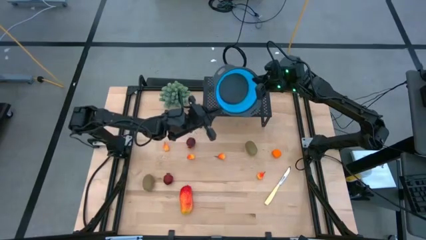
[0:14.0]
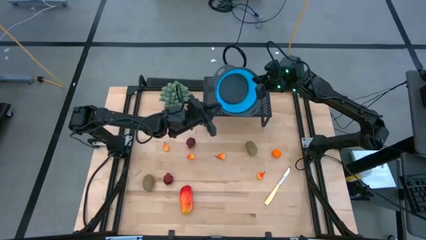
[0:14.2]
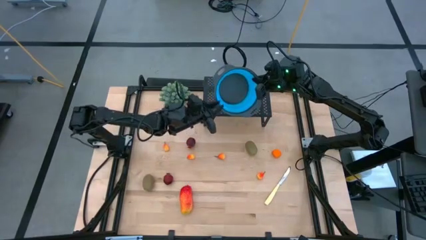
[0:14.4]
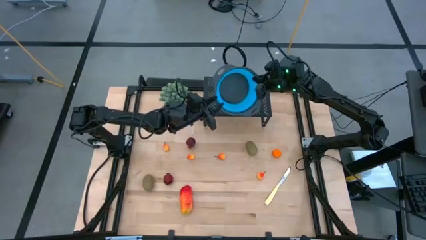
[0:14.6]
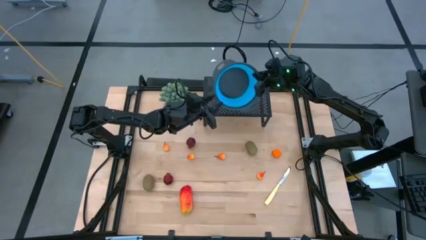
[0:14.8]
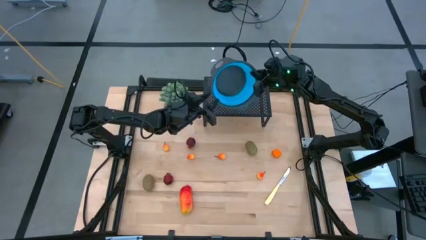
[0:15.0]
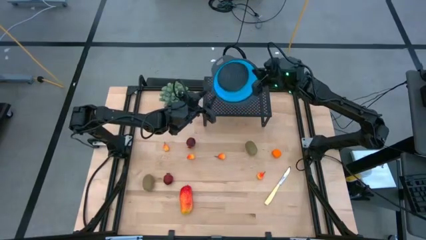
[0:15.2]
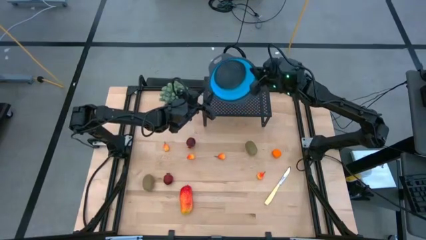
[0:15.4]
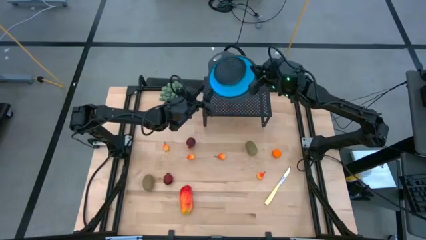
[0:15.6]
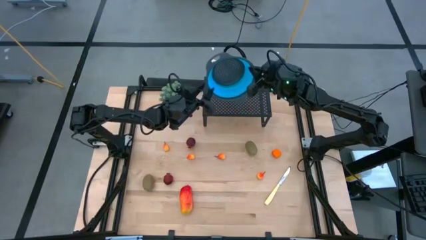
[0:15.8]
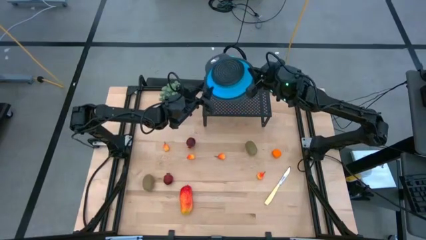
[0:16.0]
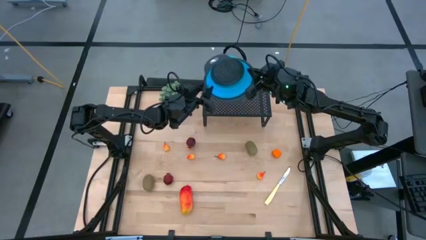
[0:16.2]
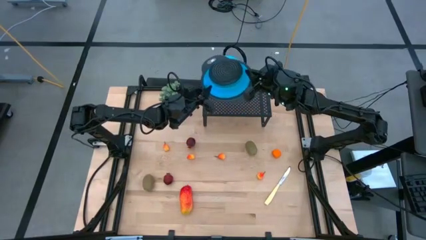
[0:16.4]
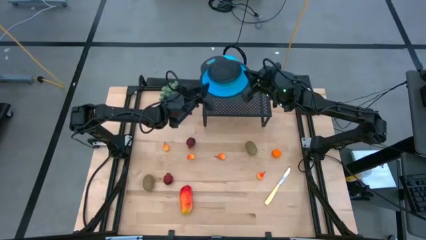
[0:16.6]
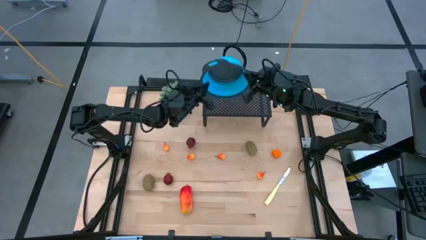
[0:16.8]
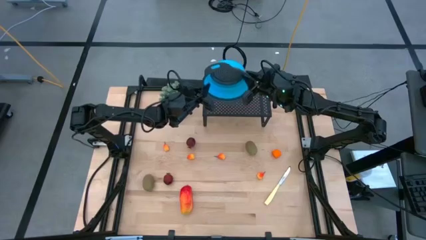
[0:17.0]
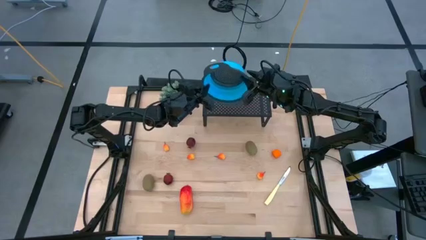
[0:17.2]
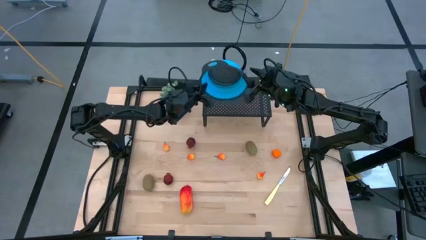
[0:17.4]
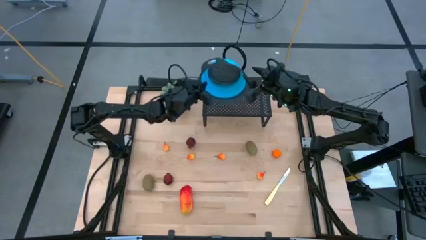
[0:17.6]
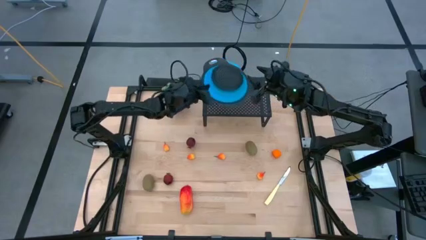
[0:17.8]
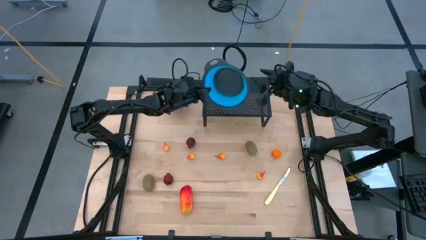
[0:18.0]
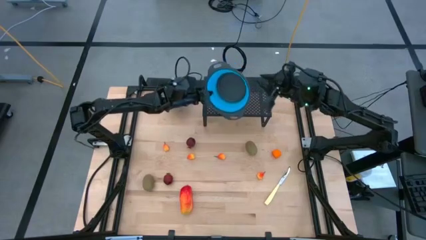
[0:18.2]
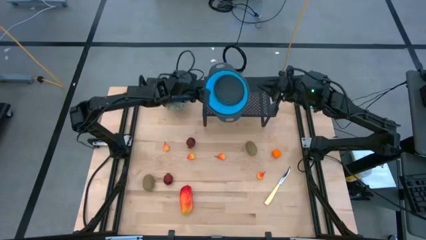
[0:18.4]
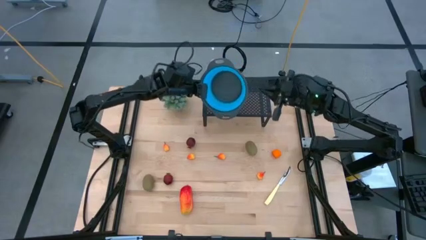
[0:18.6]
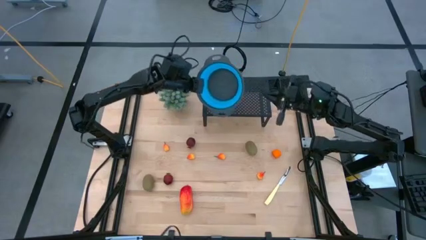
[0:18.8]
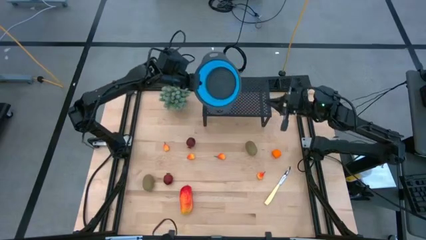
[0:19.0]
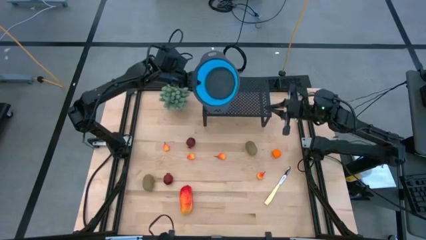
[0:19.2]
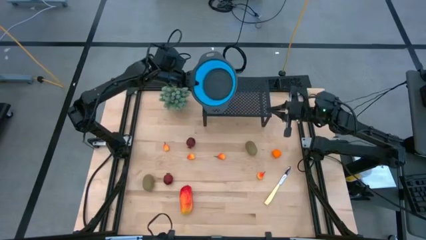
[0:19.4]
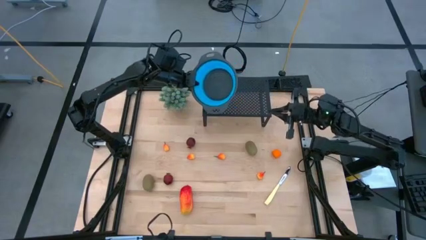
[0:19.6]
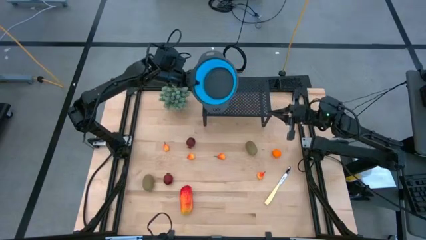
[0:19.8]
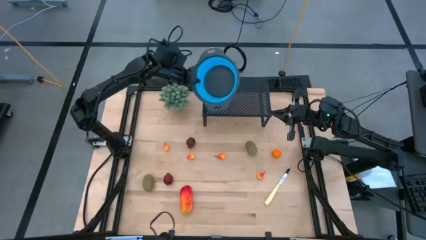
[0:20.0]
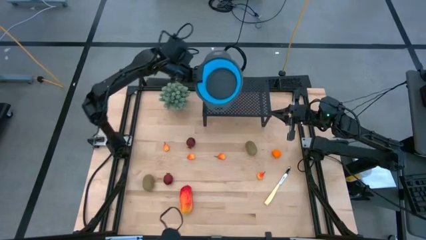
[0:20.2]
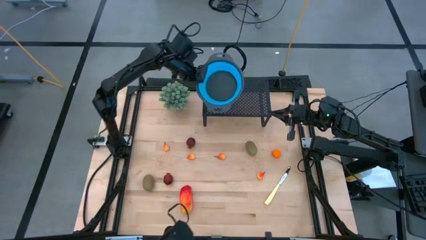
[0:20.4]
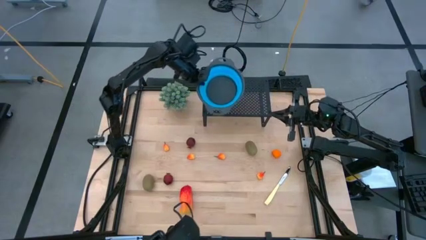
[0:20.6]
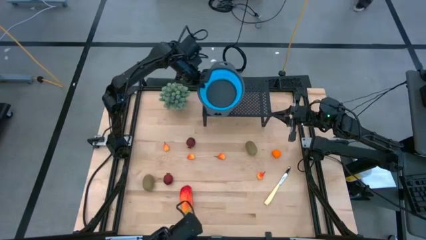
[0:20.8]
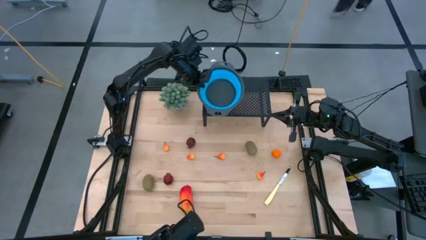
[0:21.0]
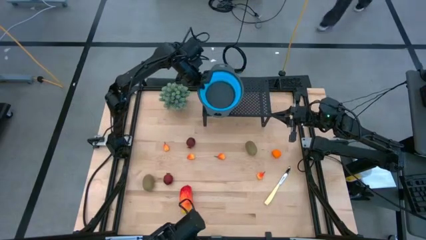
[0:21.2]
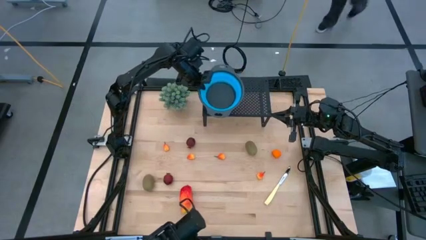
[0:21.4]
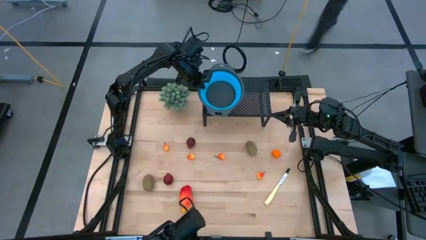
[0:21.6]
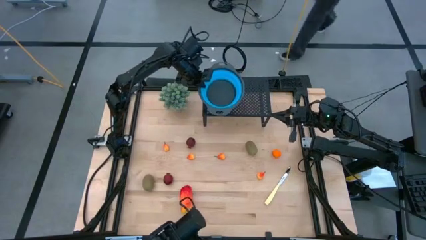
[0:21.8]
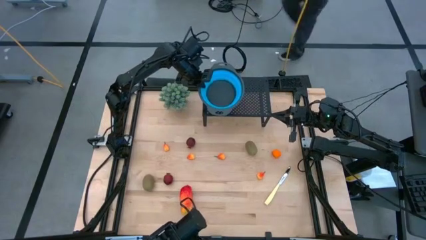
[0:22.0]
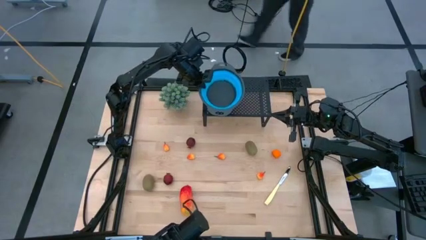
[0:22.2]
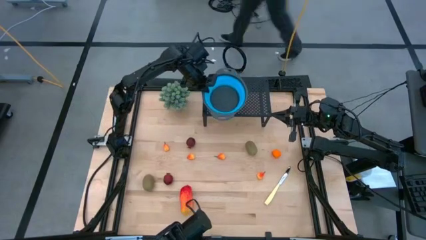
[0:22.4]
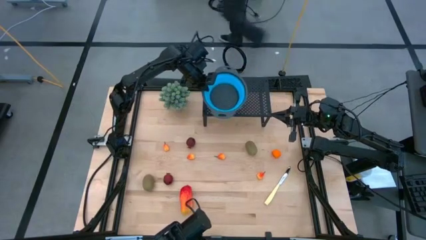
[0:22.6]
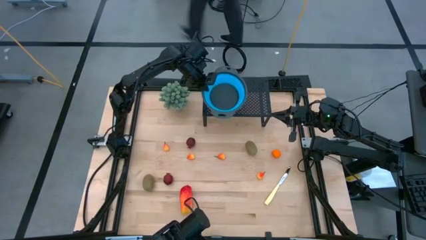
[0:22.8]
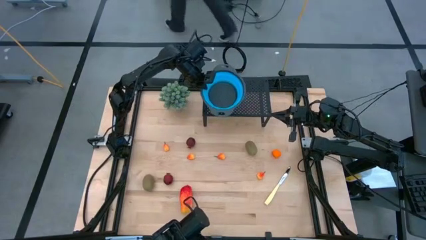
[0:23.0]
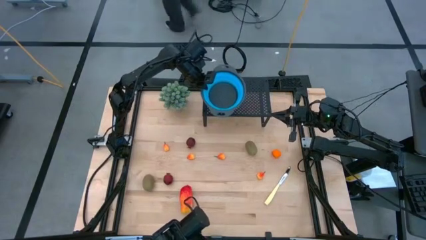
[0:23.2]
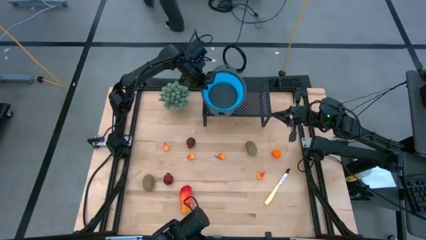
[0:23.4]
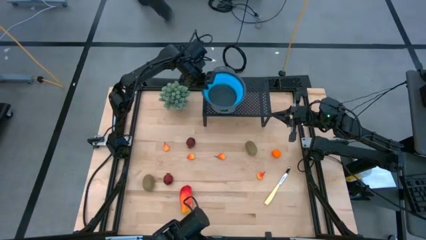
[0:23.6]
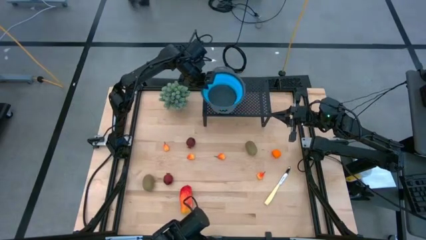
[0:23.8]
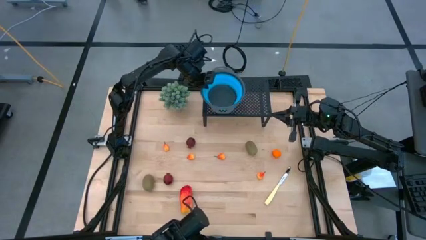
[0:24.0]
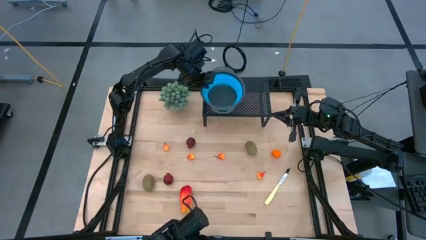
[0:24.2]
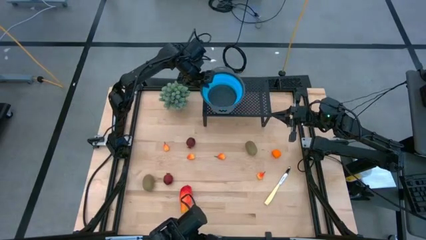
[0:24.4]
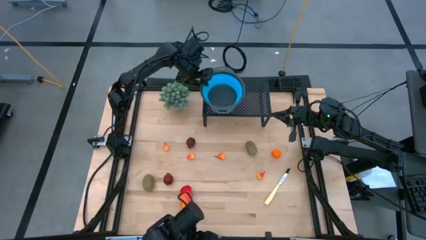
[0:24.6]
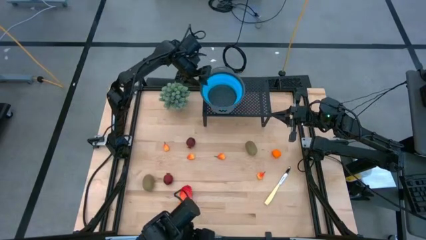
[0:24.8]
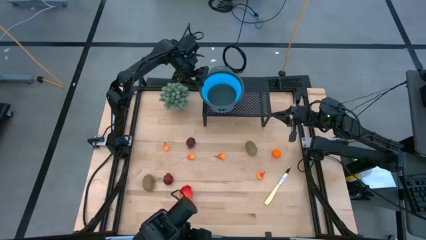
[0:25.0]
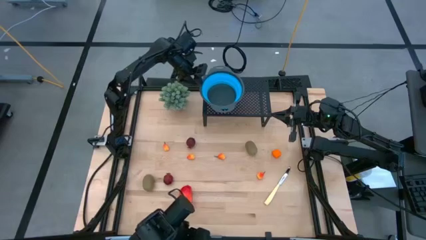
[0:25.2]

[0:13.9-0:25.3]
Task: Pick & Place Fruit
Put the blue strainer bowl on the shelf
